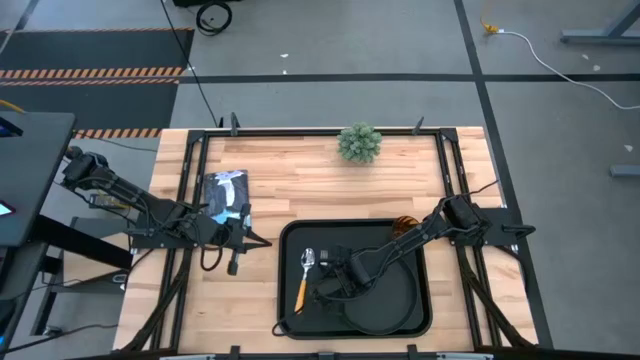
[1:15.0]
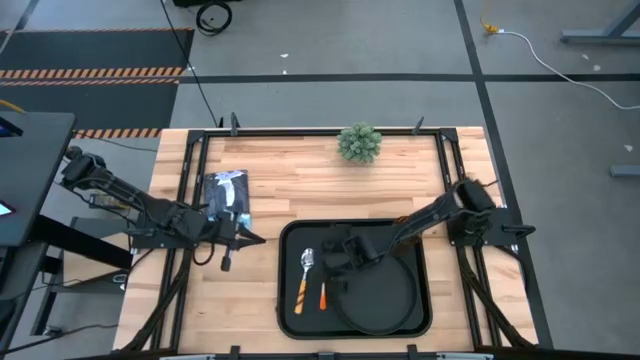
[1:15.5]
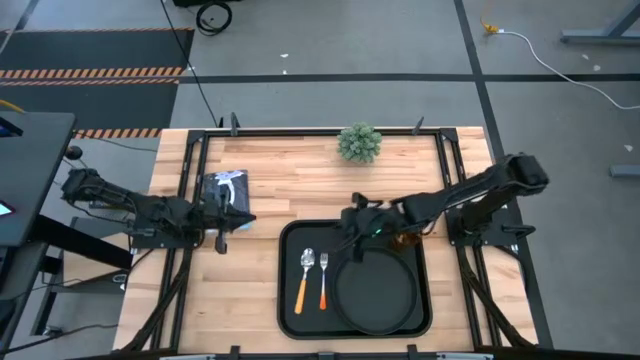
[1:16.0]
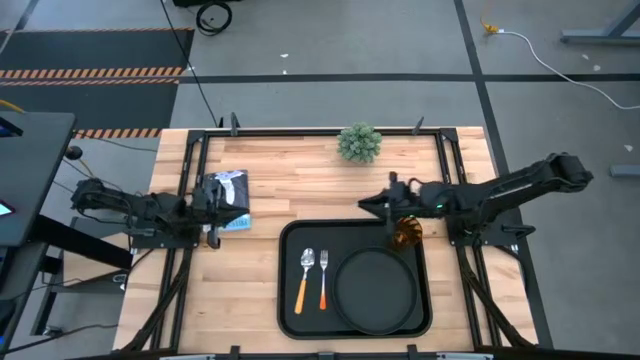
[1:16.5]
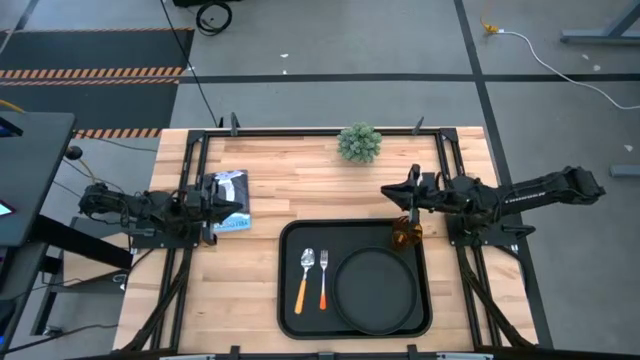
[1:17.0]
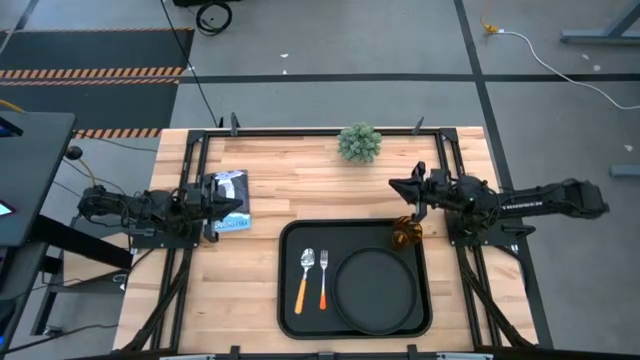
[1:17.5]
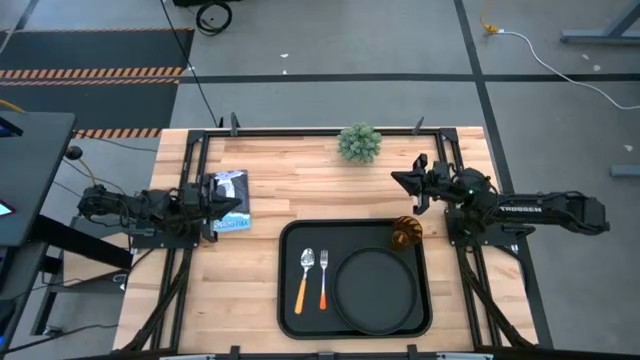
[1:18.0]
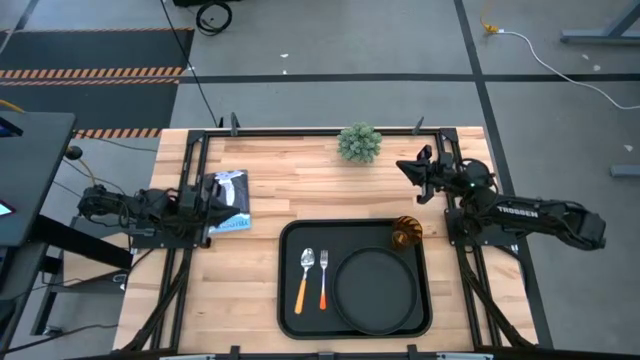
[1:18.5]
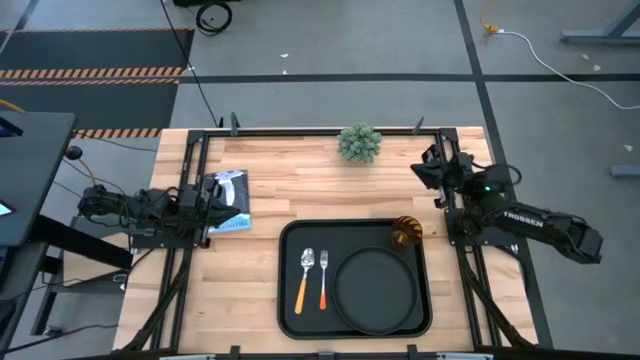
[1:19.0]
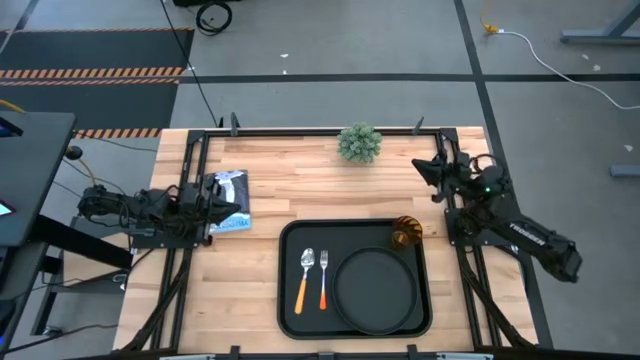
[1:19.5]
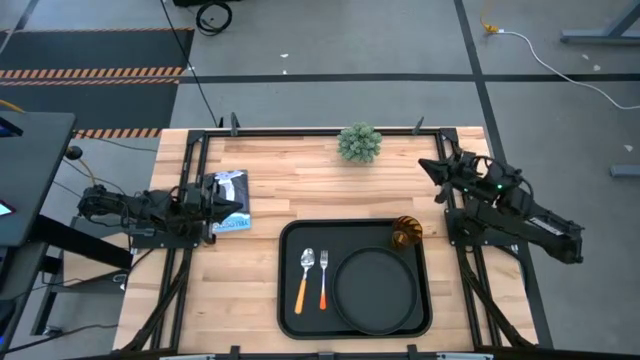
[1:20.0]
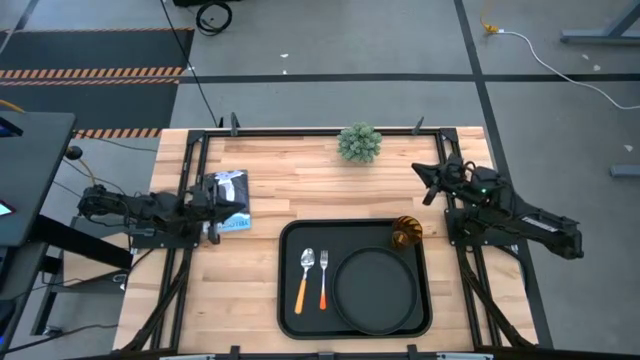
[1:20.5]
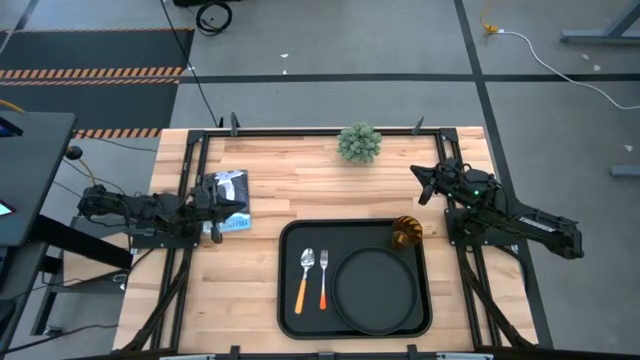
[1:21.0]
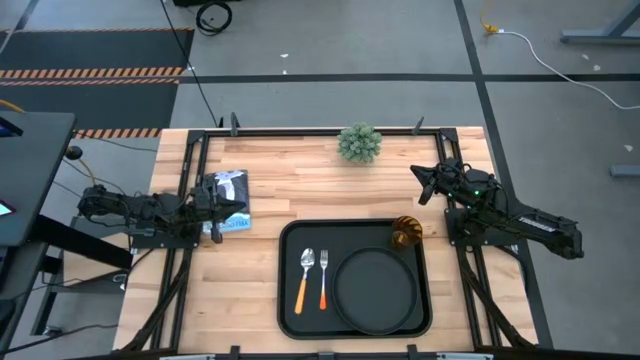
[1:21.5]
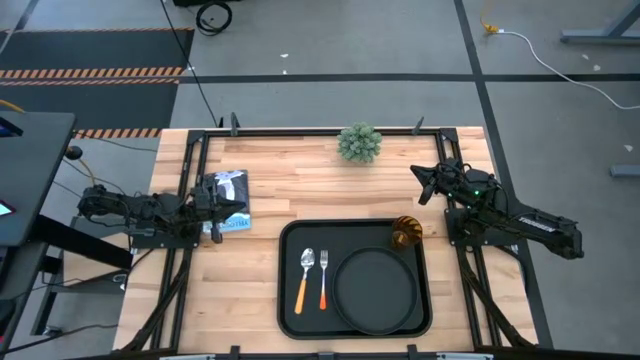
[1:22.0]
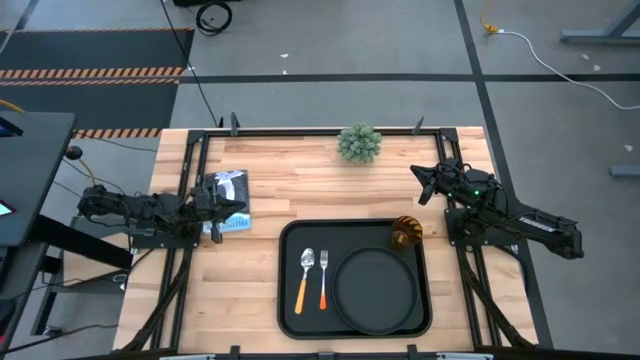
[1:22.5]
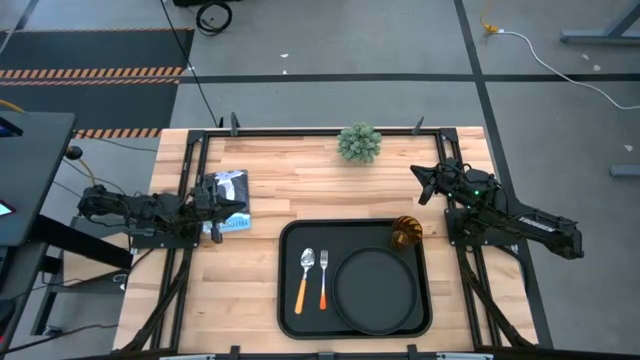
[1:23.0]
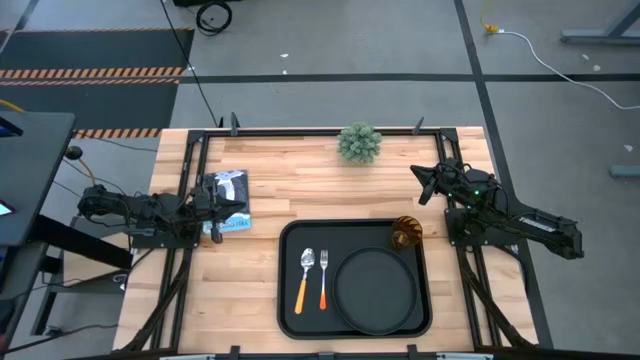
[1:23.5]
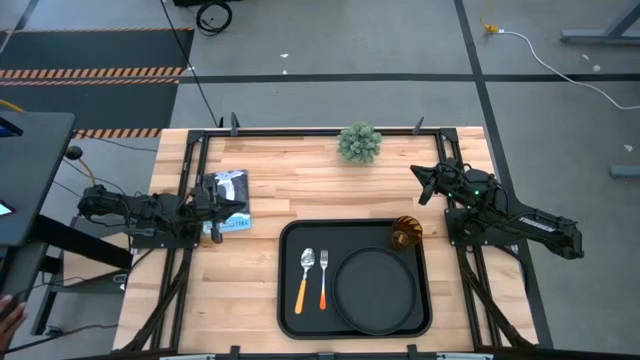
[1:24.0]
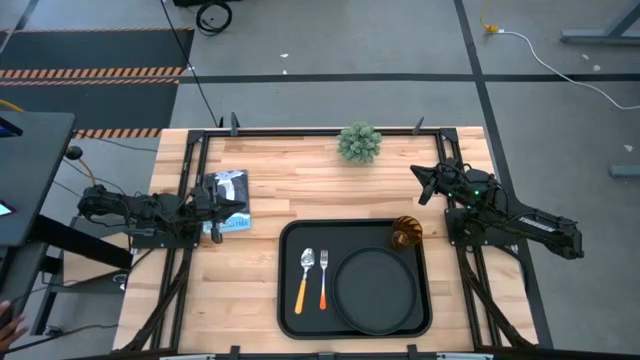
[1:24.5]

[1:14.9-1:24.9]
Task: Pick and place plate/cup/fork/spoon on tray
Return to Home Position

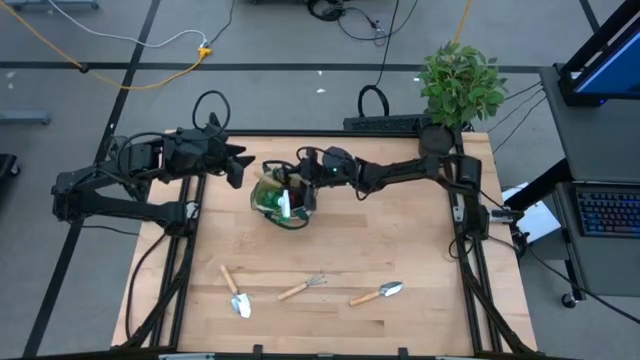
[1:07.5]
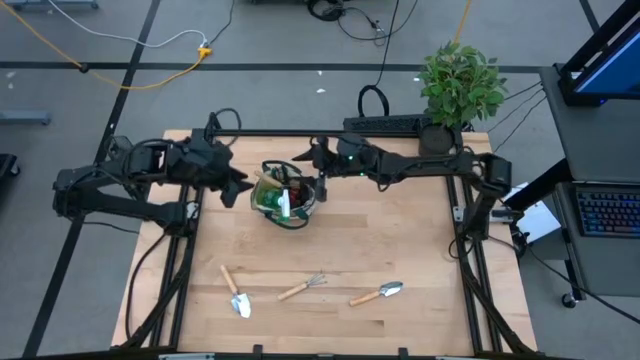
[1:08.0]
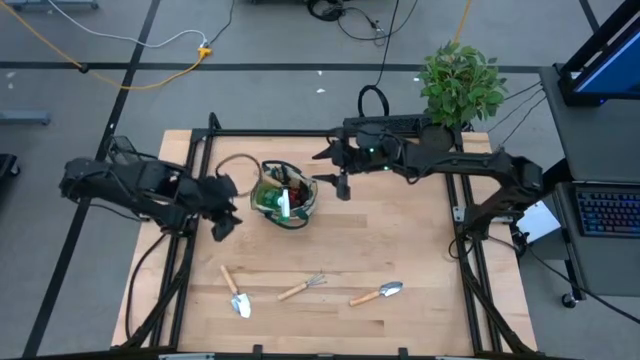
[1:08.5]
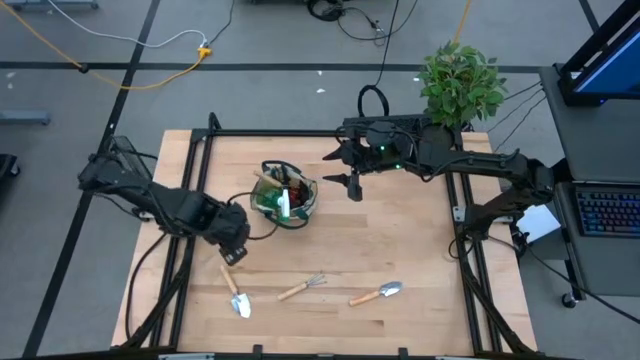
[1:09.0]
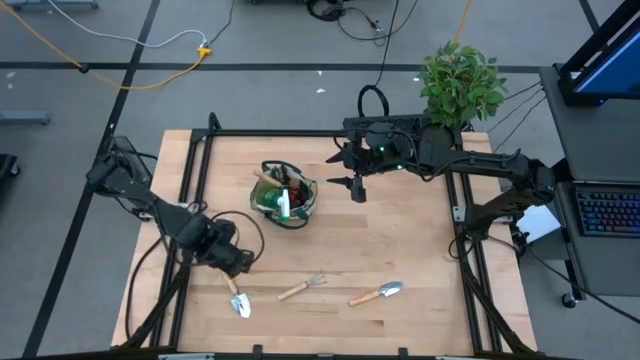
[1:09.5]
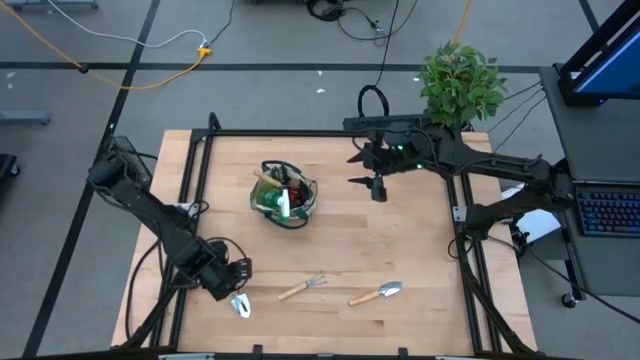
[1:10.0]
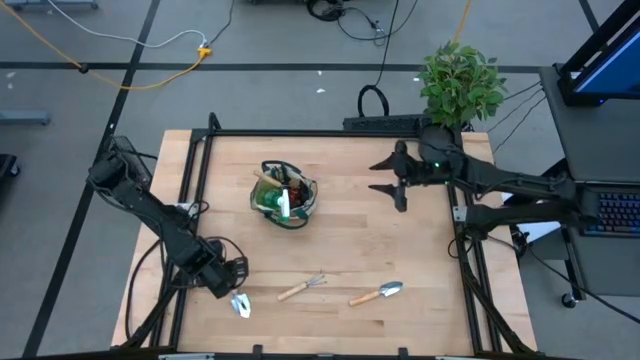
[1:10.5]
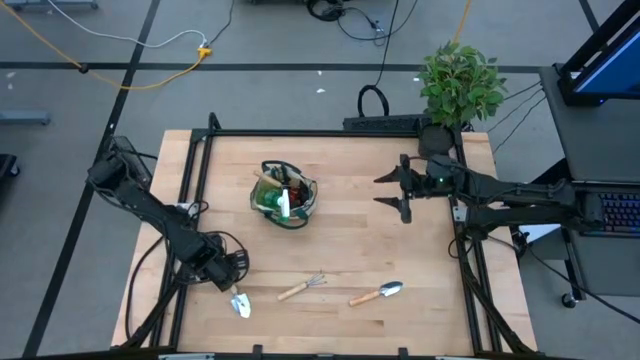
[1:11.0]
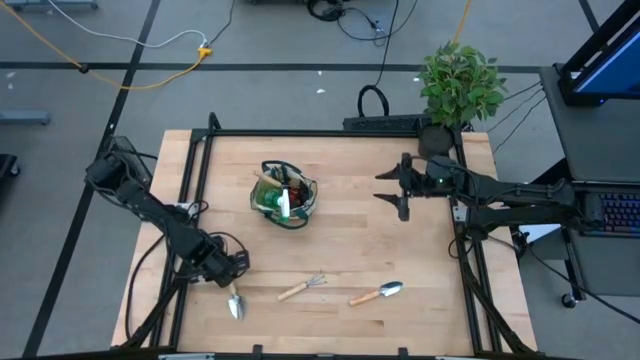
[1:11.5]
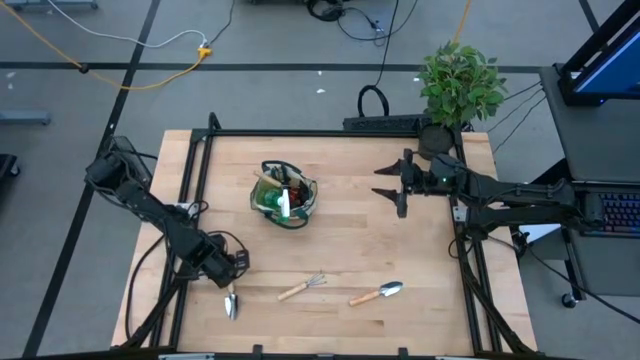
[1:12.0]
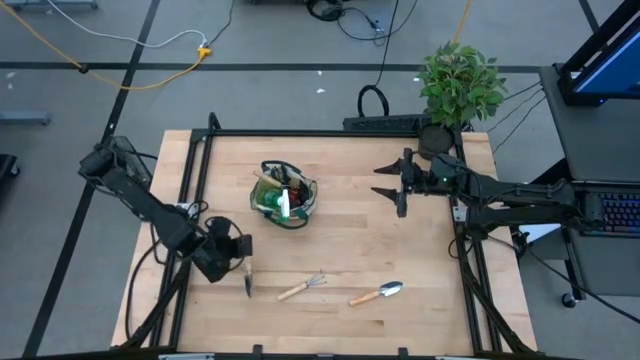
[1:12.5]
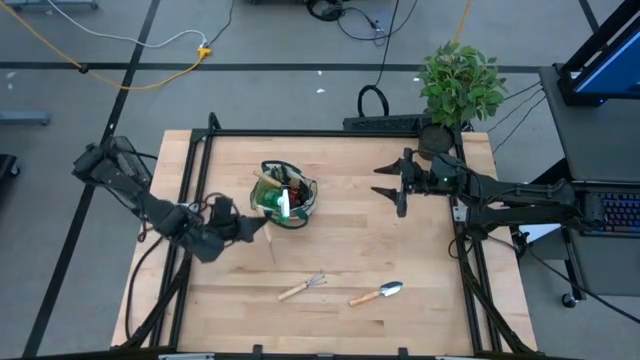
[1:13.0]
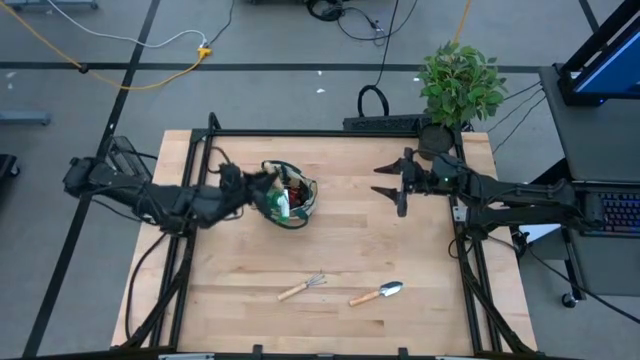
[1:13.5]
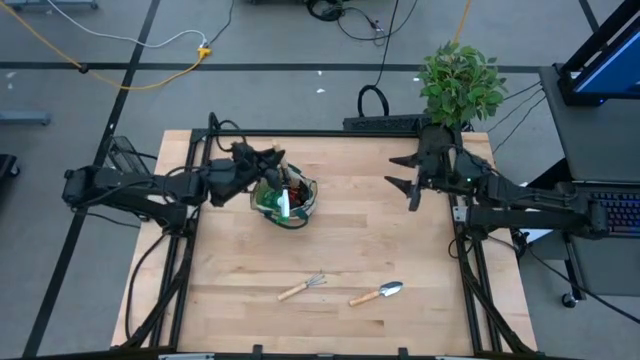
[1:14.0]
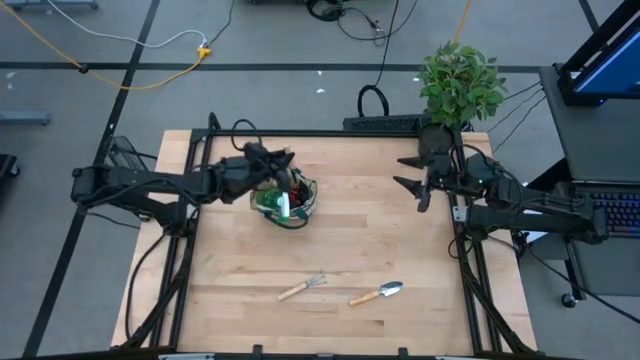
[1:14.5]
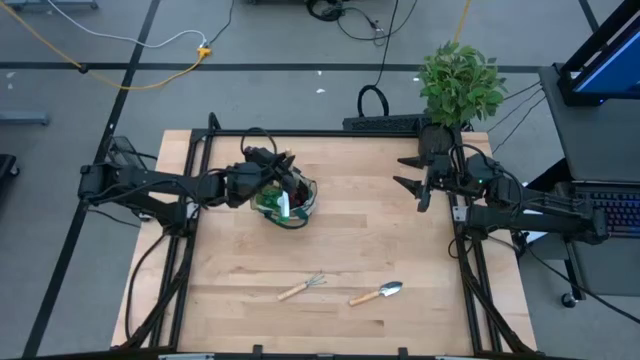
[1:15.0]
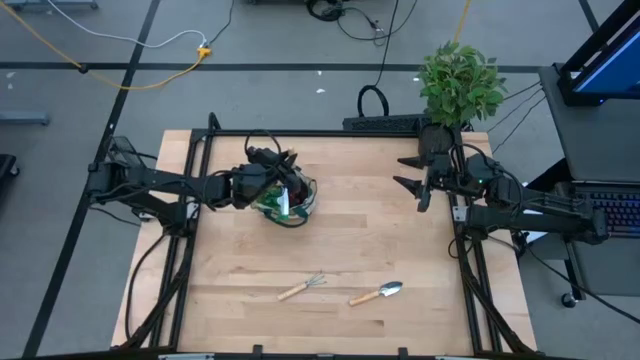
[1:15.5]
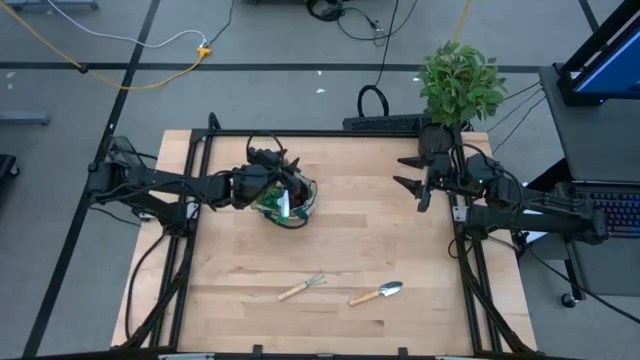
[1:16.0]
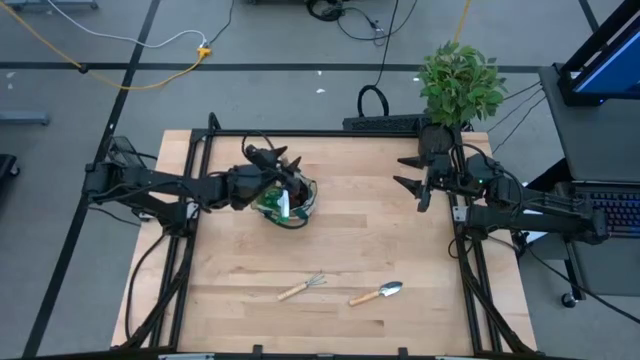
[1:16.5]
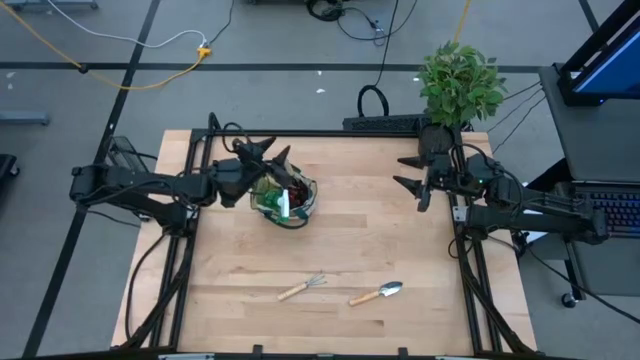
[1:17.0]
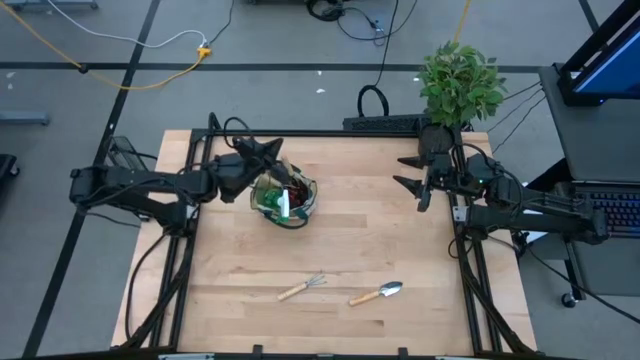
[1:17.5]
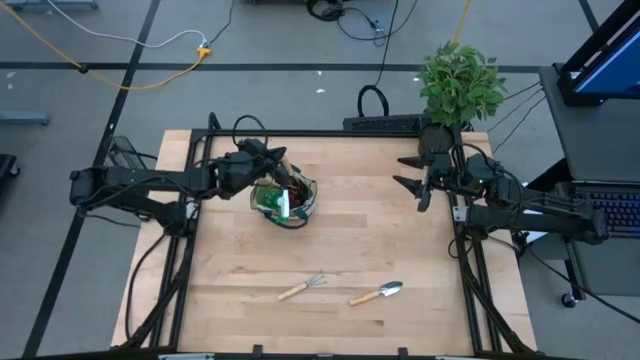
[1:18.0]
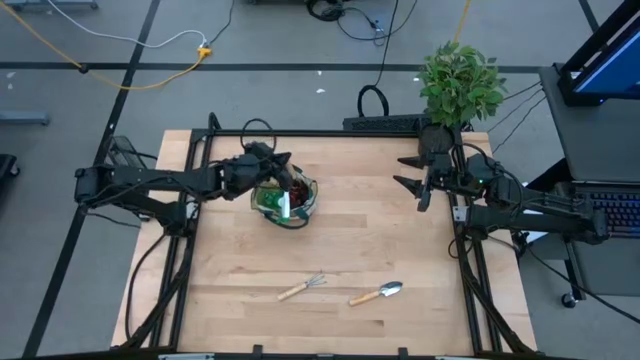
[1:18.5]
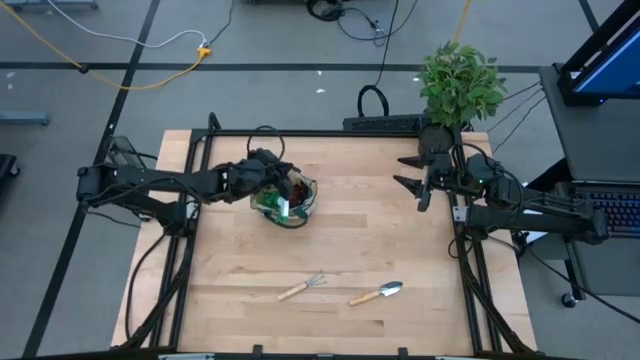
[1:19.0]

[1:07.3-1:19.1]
Task: Pick & Place Garden tools in Gardening bag
Put the left brown trowel into the gardening bag

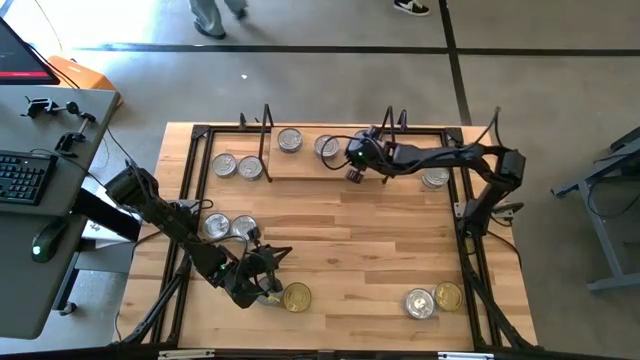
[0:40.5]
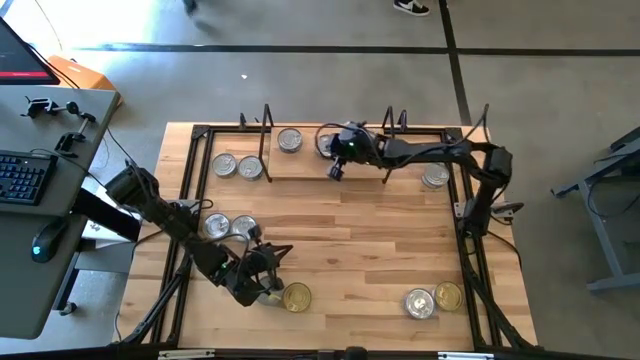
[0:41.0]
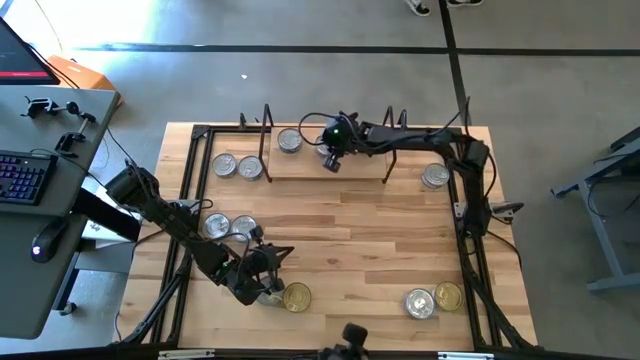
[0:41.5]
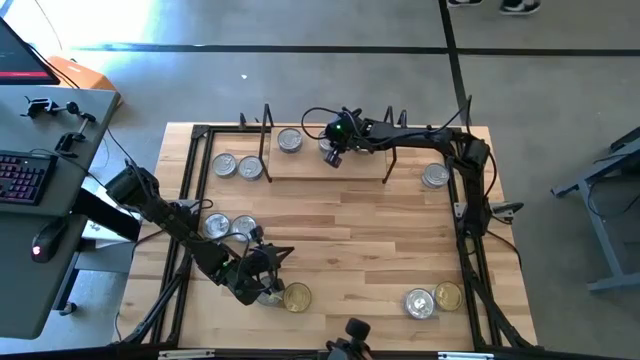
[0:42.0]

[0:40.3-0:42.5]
Task: Stack canned seafood by type on shelf
Adjust the green tuna can on the shelf
